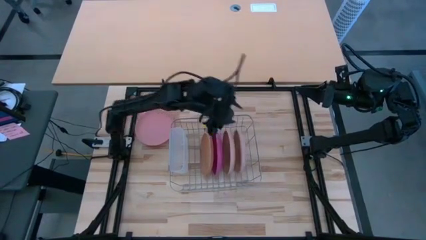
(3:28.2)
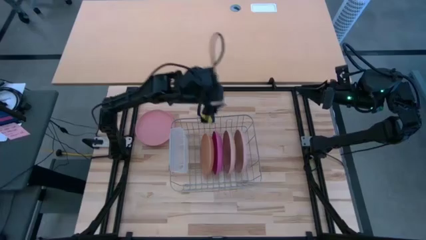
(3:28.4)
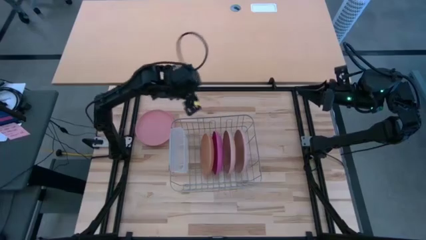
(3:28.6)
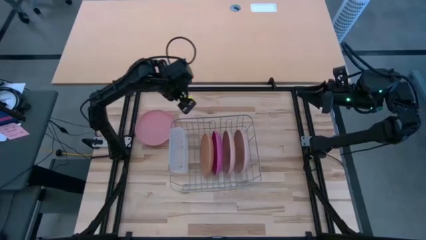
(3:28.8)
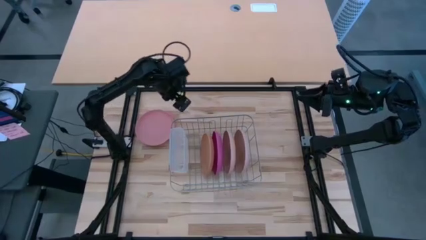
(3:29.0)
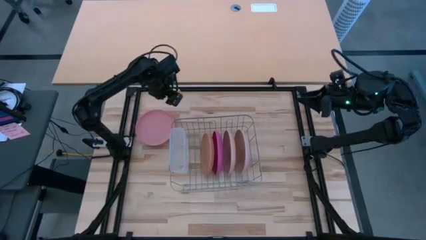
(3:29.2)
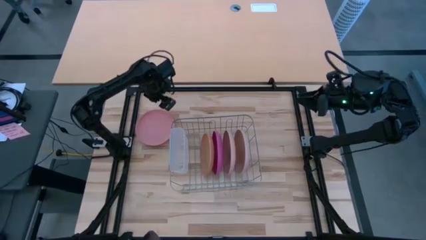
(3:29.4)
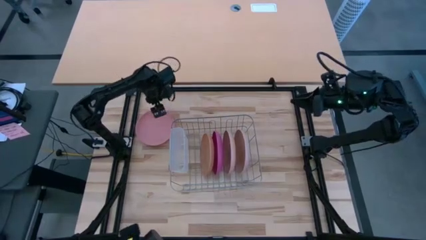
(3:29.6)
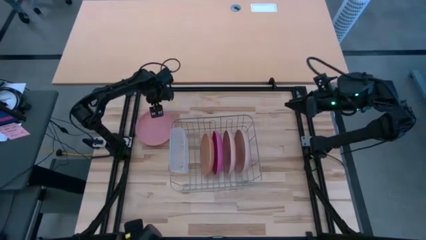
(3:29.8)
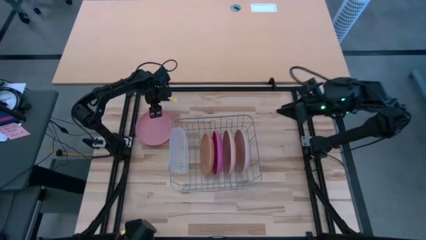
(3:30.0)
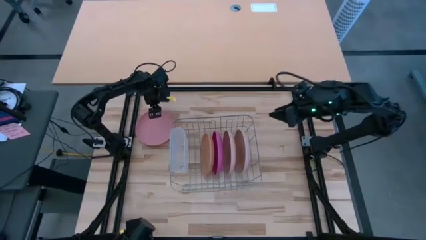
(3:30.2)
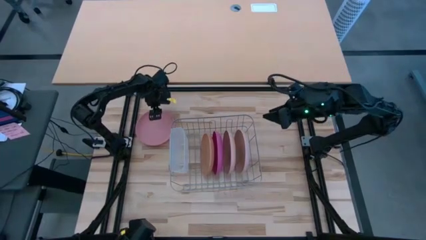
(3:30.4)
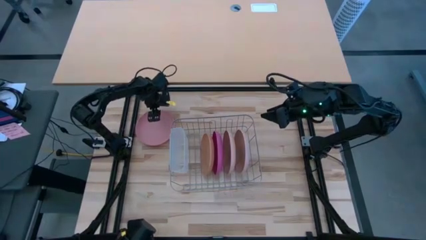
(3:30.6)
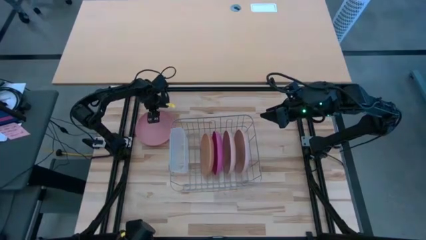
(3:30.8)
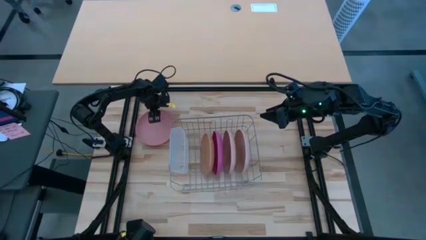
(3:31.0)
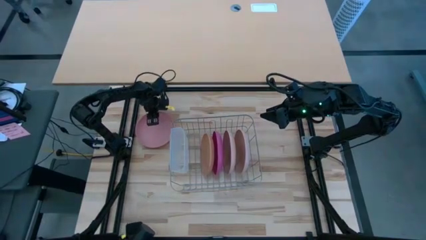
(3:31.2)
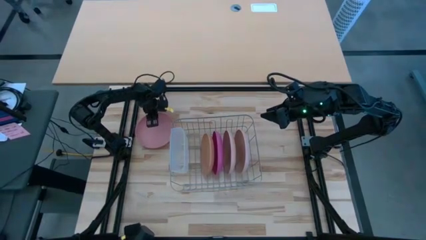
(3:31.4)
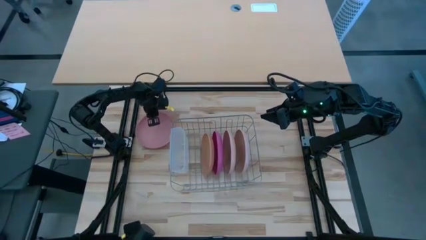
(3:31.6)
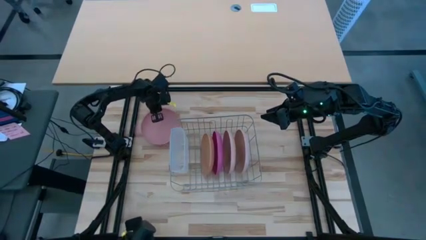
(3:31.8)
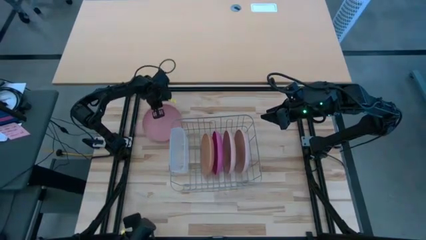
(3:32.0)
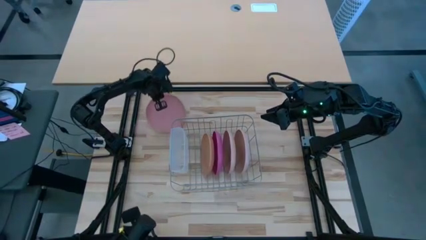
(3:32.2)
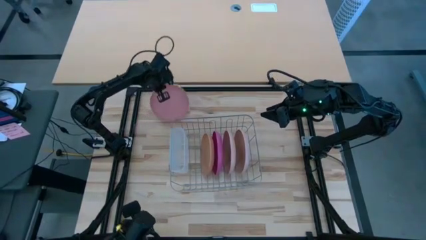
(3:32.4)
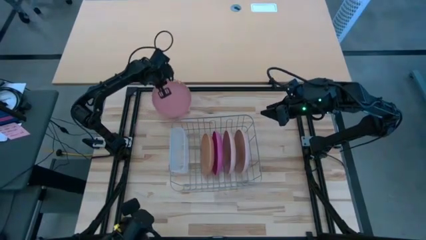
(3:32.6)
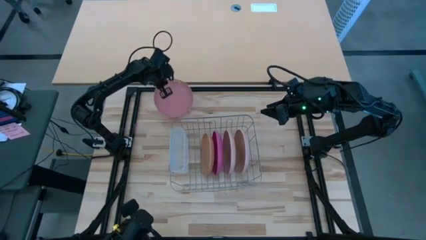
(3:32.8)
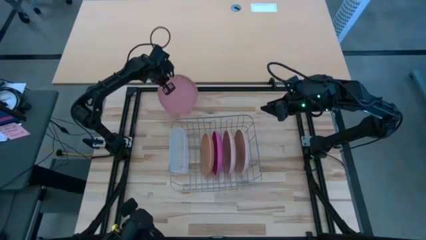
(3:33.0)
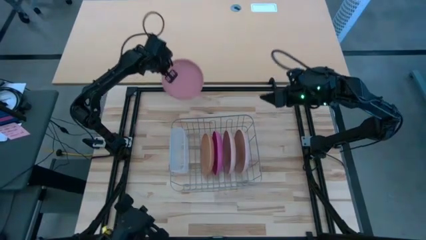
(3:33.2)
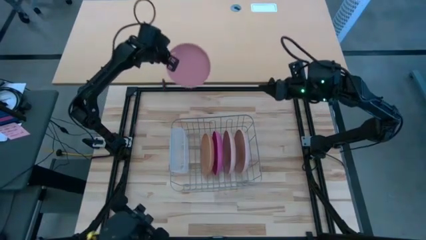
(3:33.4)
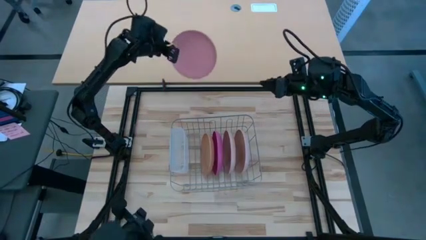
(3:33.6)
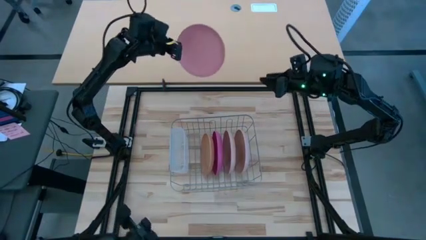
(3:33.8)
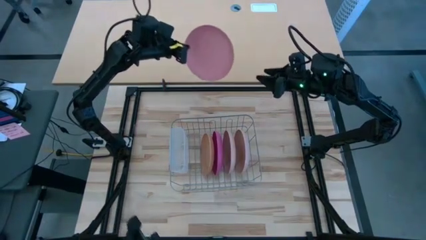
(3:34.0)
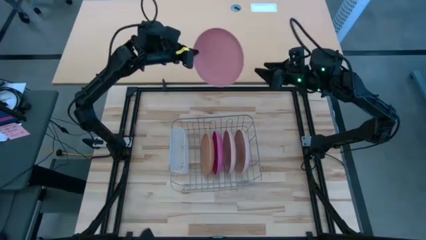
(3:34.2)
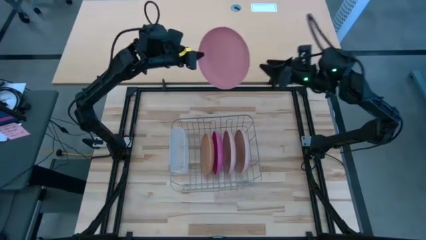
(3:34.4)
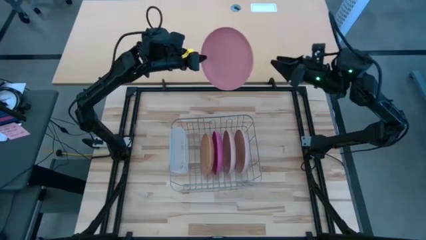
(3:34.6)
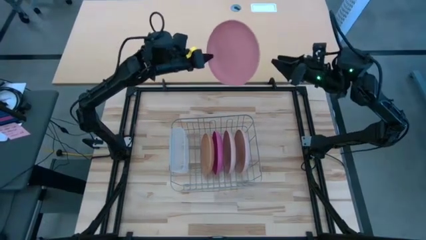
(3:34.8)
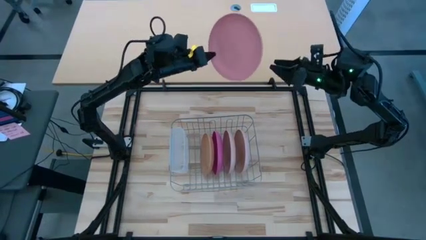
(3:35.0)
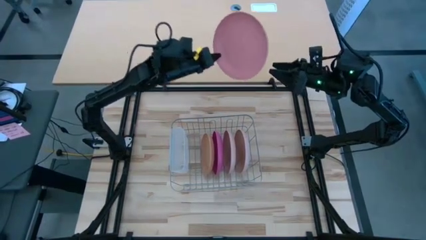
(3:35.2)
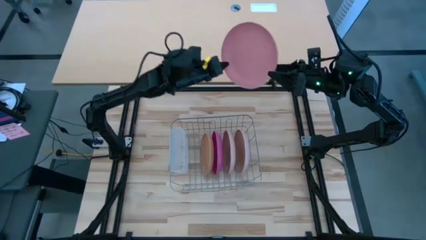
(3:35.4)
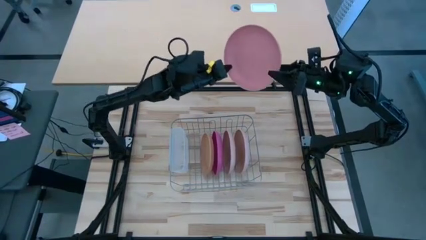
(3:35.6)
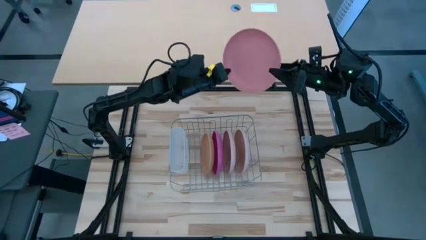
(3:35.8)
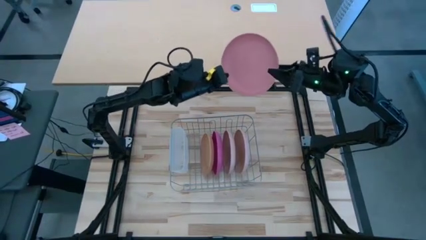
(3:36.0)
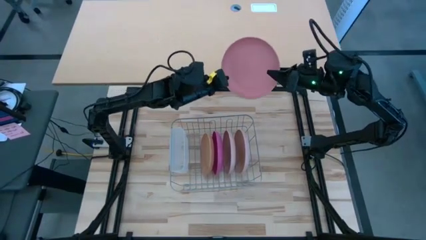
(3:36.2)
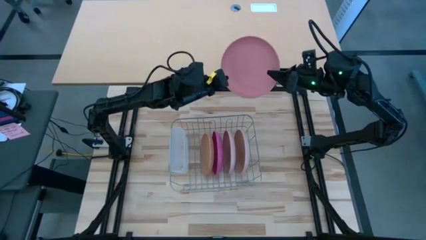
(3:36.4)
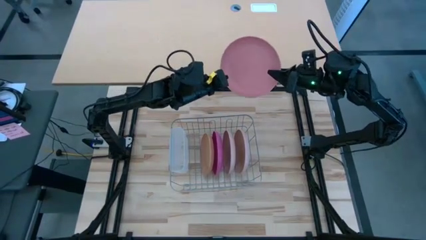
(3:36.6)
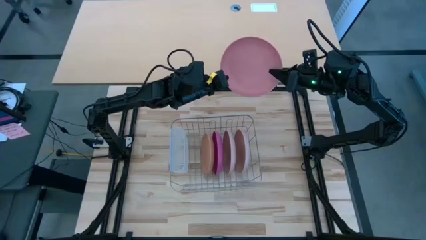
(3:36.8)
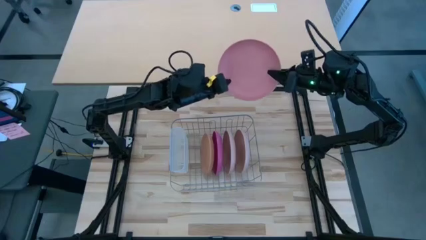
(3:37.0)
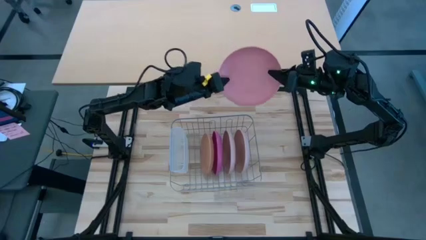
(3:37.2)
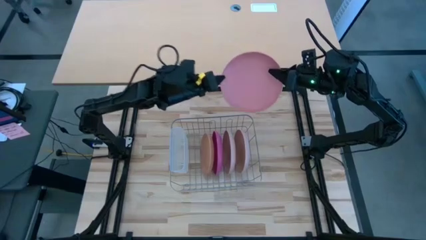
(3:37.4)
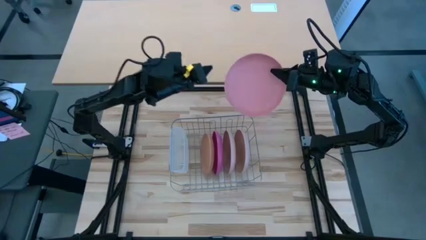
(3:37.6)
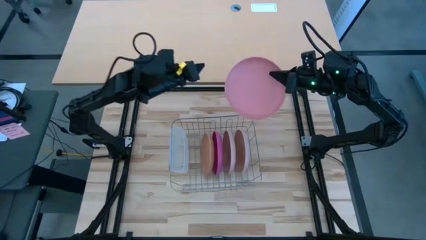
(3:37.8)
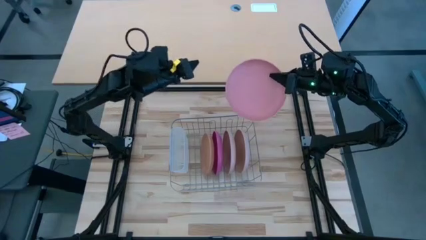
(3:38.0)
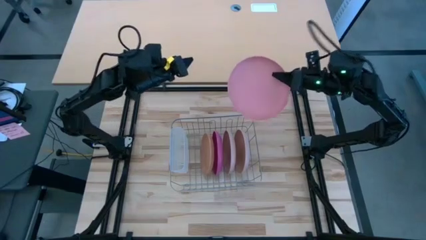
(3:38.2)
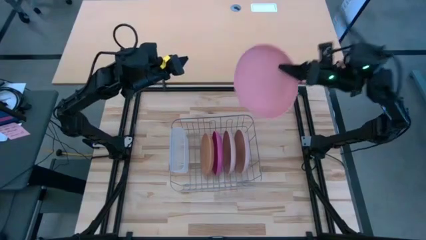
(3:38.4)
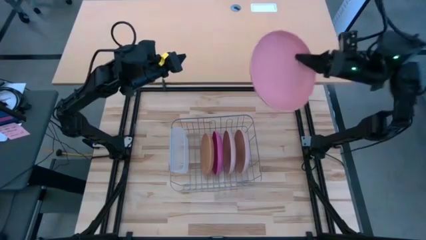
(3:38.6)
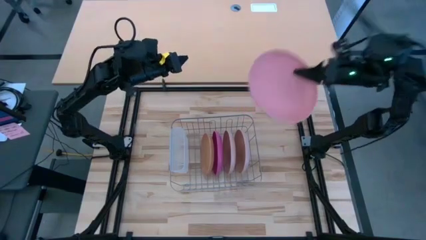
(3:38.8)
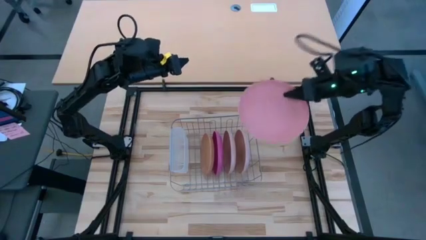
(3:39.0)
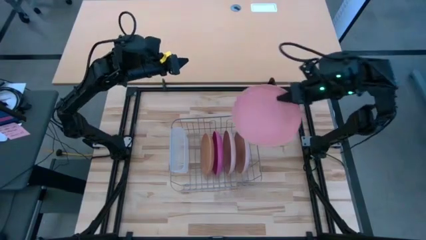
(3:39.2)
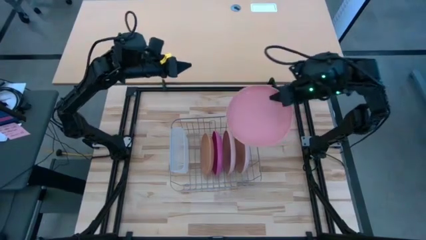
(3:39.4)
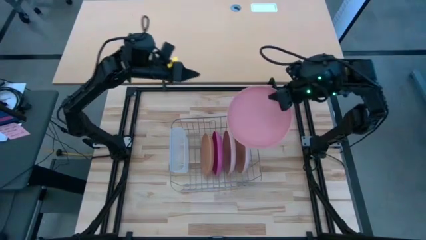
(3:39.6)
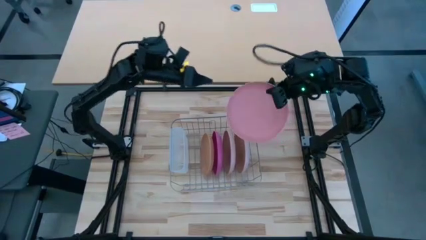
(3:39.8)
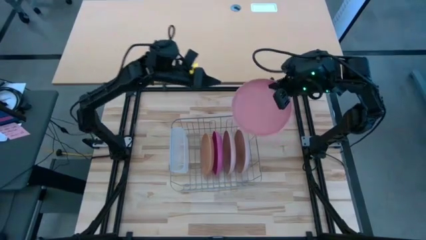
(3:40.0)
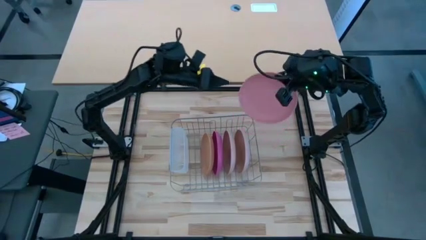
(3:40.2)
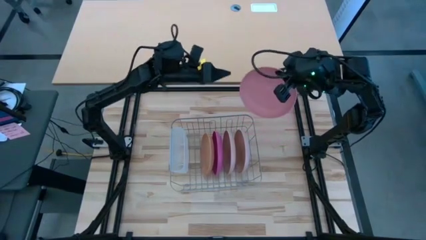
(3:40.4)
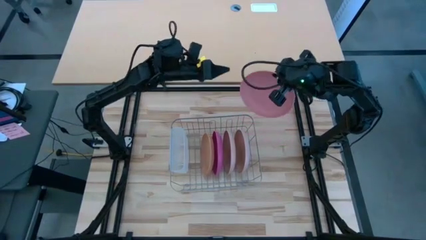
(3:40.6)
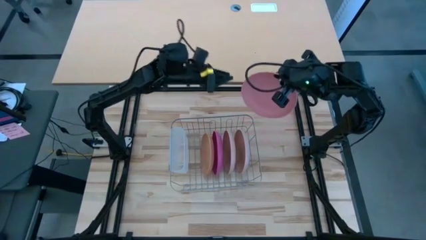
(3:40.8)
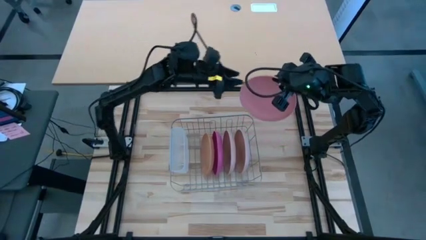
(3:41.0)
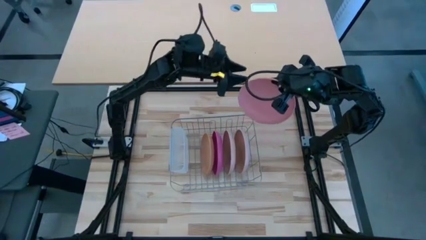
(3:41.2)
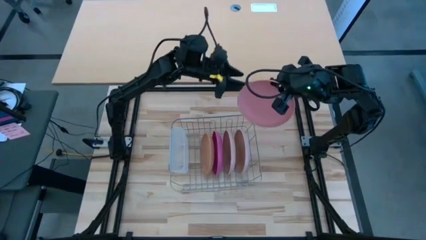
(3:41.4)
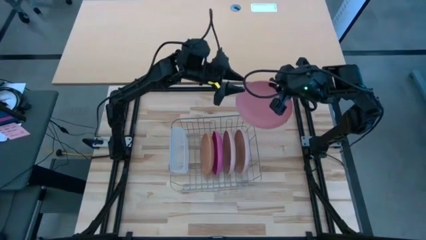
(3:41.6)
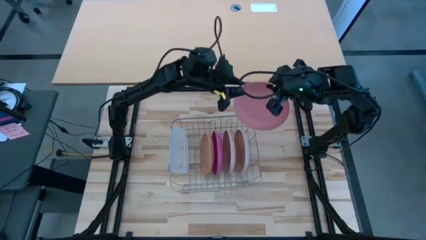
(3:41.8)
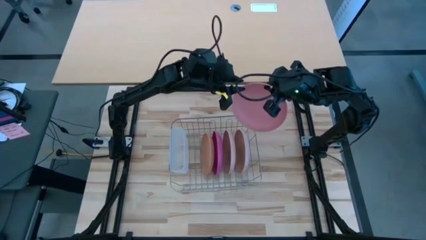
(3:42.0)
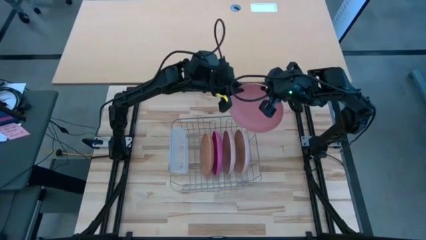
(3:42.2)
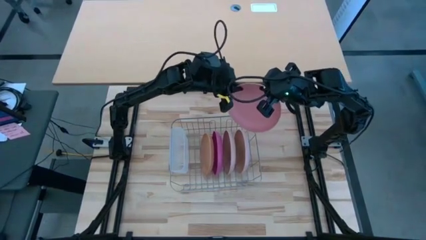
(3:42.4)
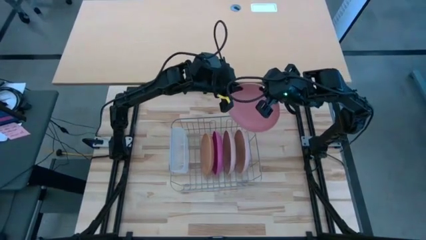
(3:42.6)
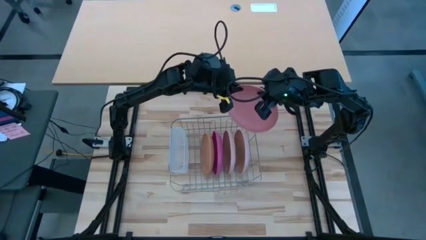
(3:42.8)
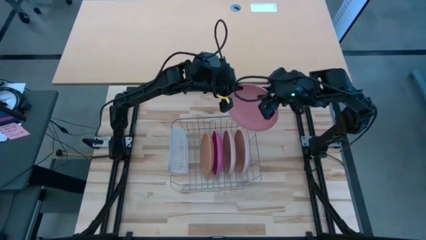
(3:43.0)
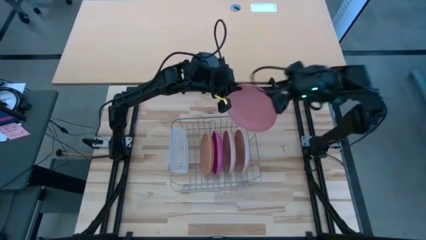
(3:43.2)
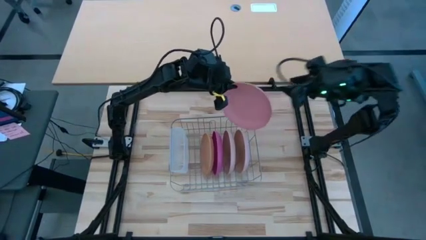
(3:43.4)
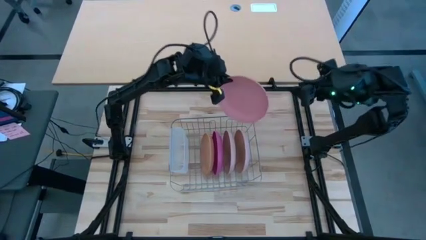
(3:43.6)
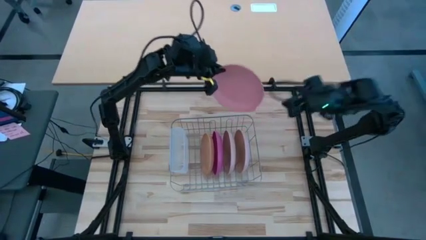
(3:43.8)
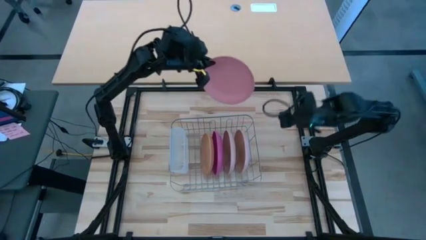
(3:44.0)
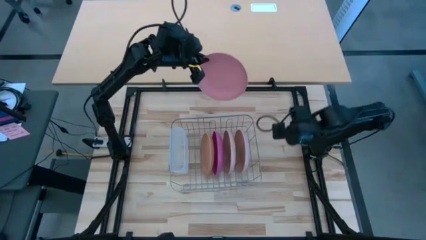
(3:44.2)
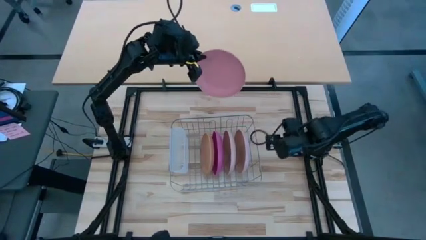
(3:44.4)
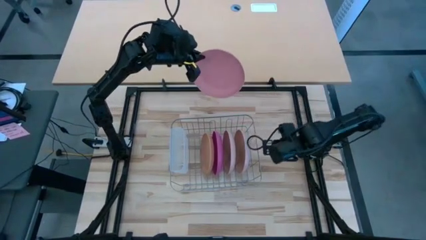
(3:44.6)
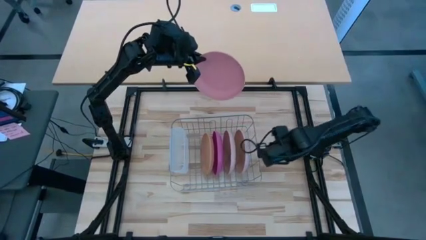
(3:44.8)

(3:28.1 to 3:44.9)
Task: Sort dishes
Put the light pink plate in the dish rack

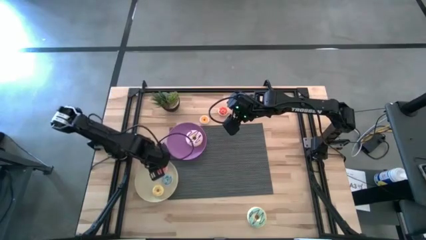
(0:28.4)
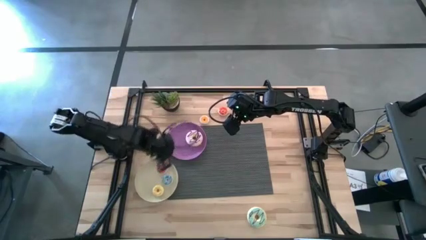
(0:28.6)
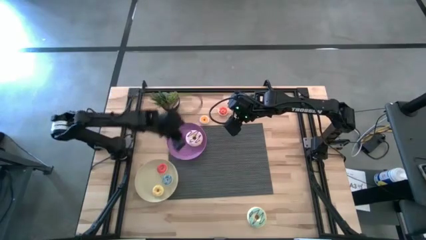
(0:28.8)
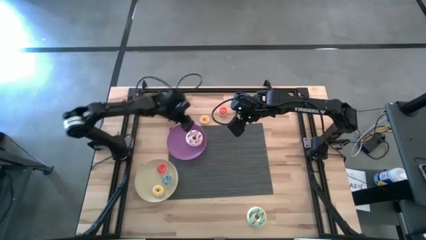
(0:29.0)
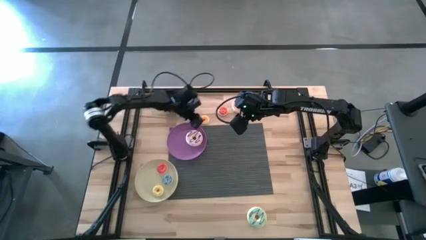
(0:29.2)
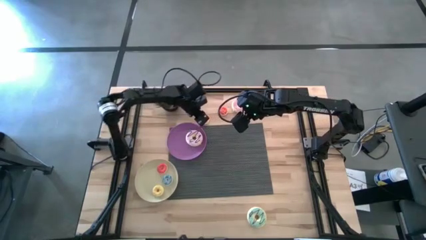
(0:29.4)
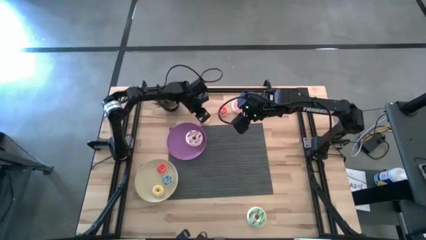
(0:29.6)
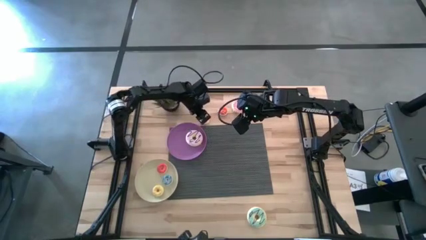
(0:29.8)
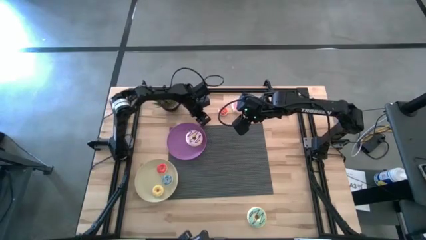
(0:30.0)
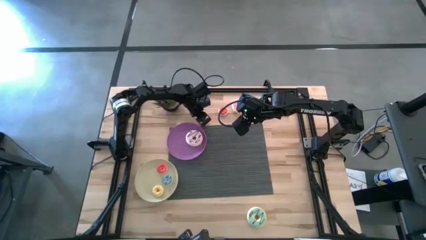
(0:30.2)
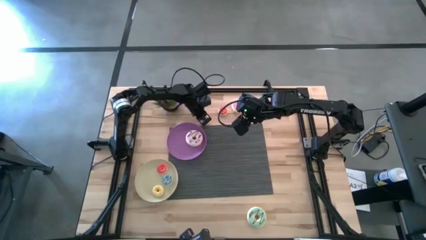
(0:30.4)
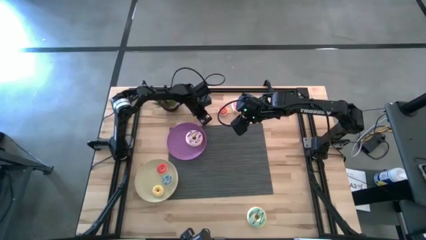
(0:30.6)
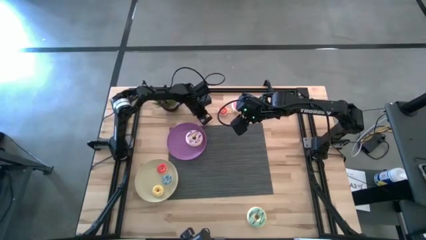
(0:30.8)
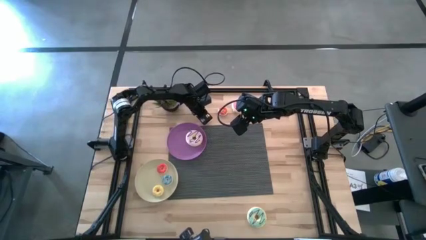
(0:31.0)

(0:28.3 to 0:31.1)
Task: Pick & Place donuts
Put the small white donut on the gray plate
